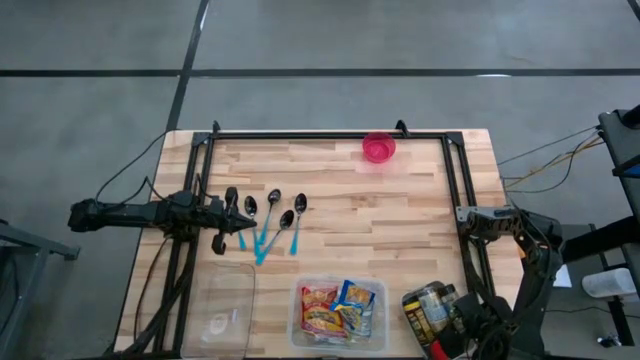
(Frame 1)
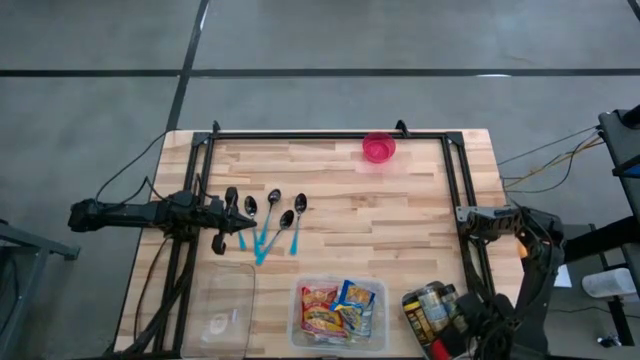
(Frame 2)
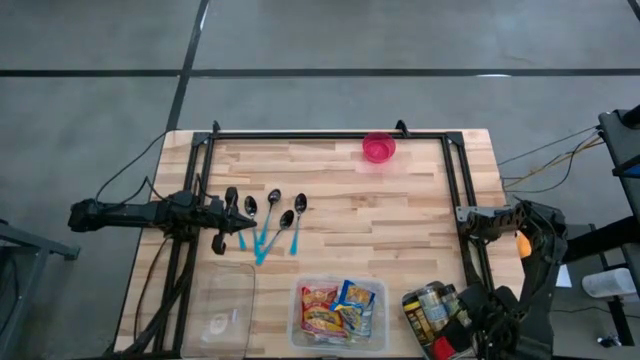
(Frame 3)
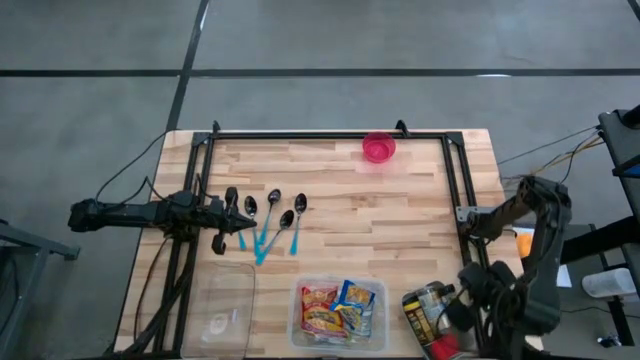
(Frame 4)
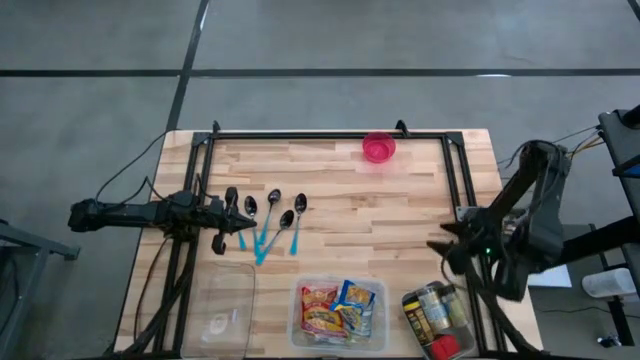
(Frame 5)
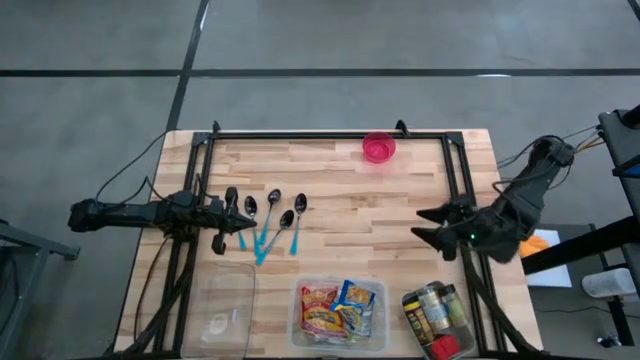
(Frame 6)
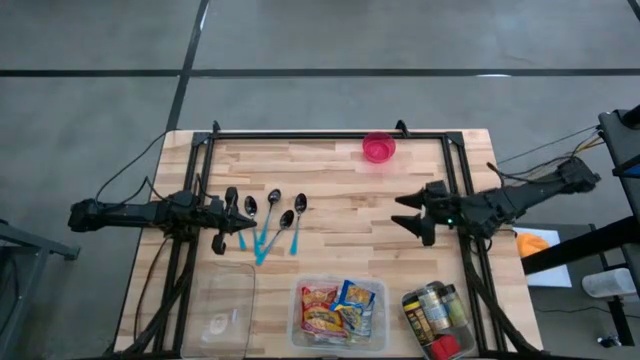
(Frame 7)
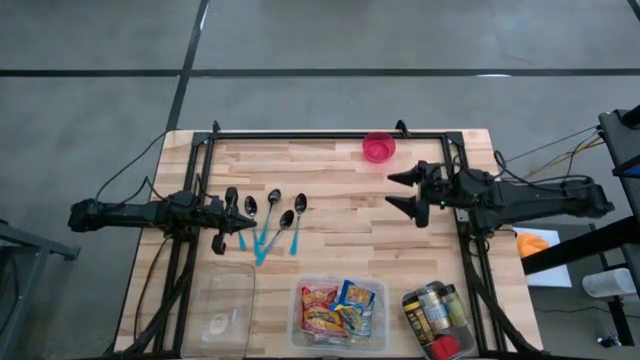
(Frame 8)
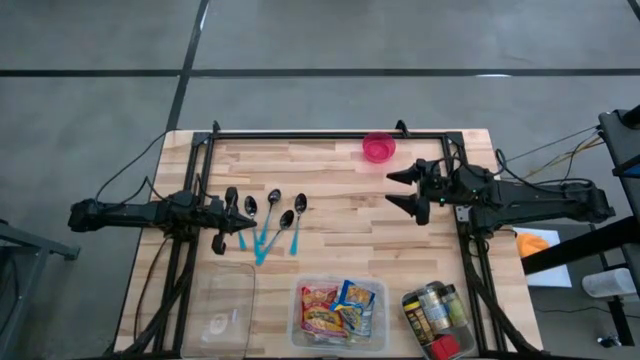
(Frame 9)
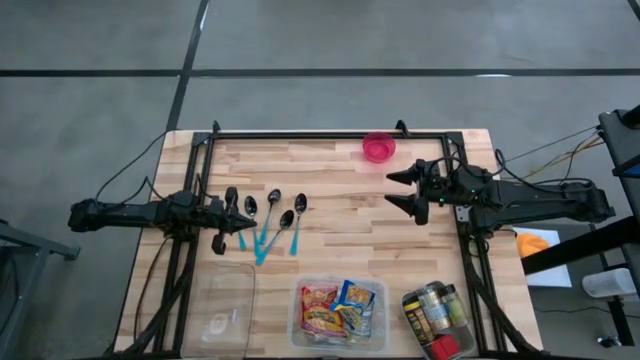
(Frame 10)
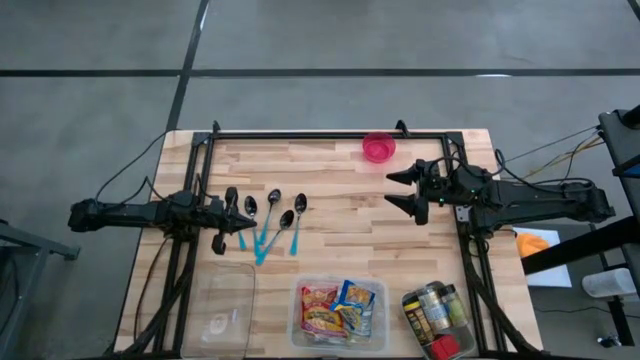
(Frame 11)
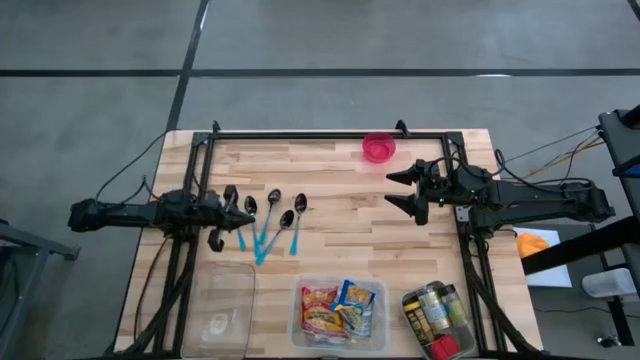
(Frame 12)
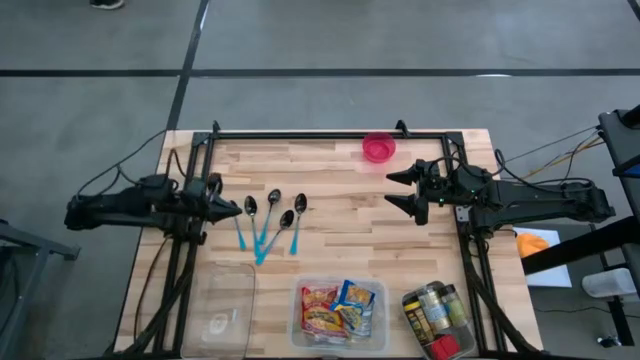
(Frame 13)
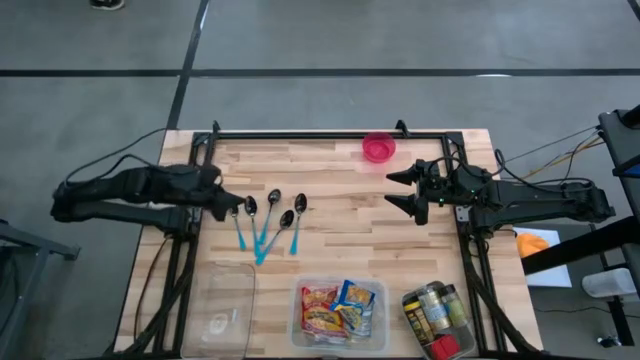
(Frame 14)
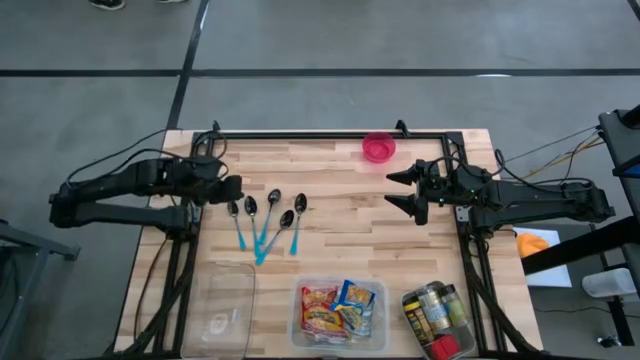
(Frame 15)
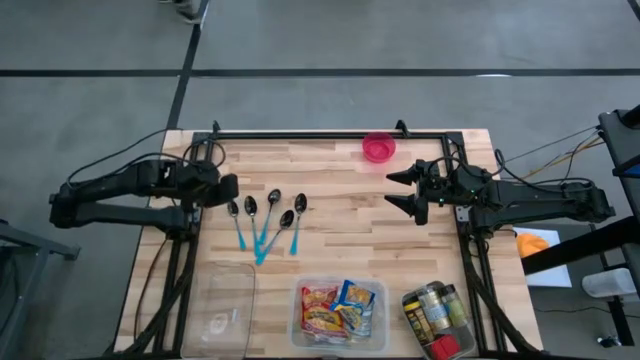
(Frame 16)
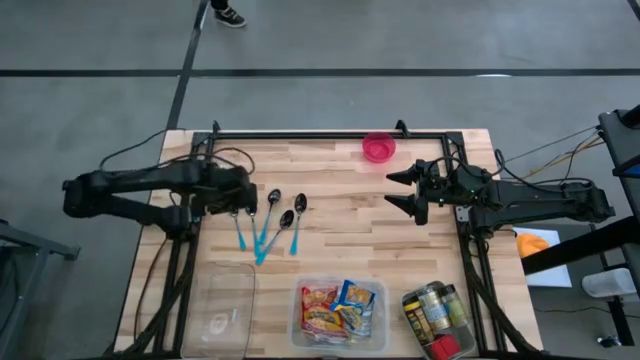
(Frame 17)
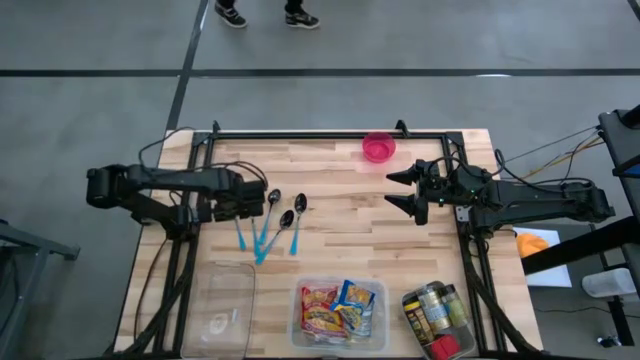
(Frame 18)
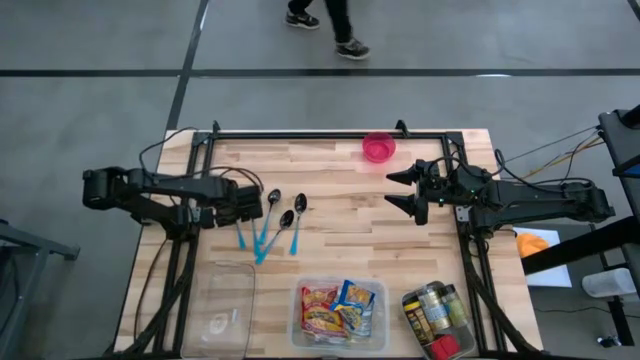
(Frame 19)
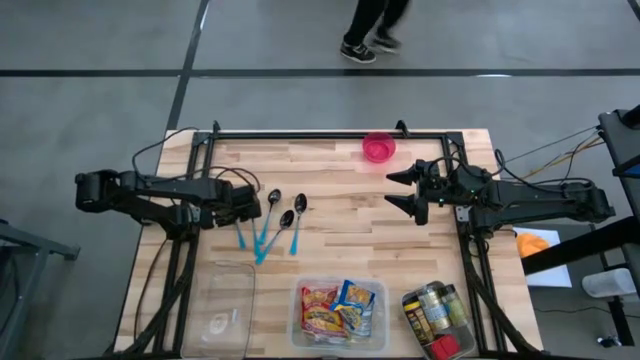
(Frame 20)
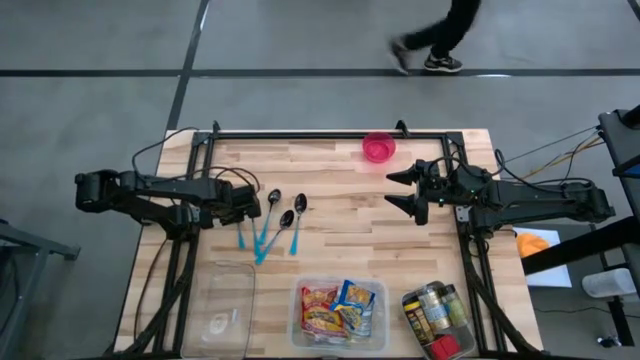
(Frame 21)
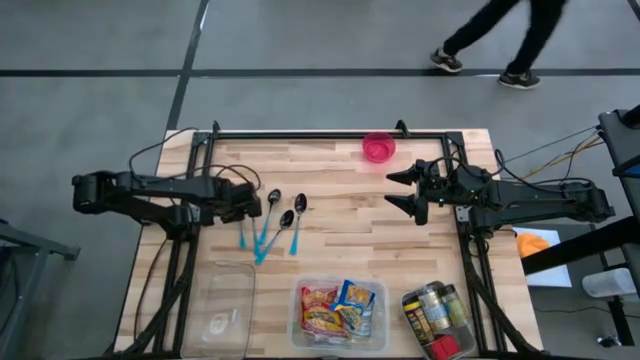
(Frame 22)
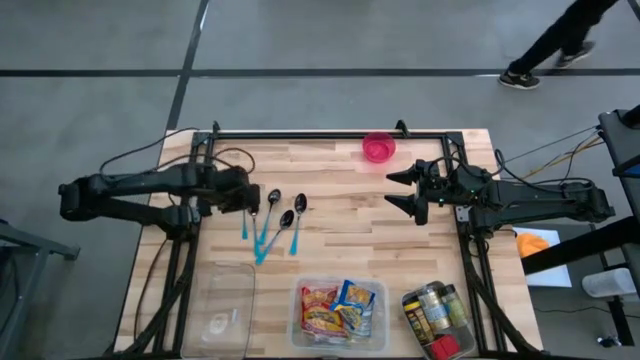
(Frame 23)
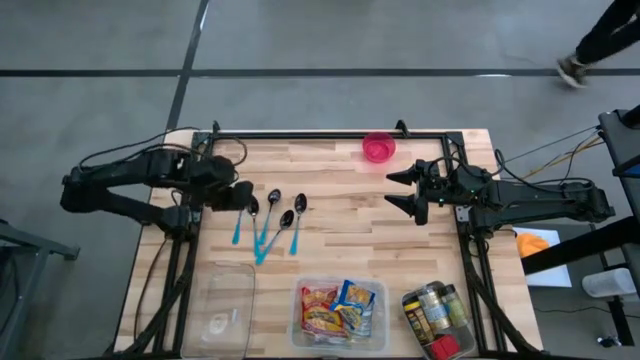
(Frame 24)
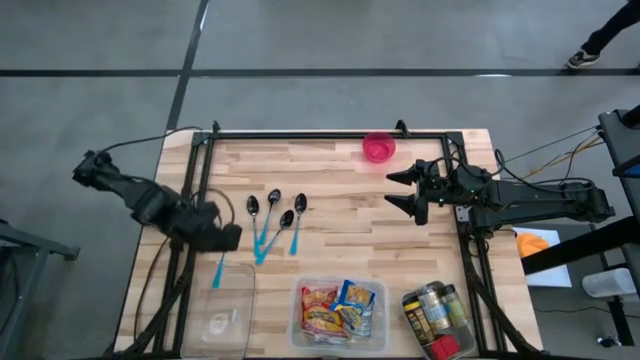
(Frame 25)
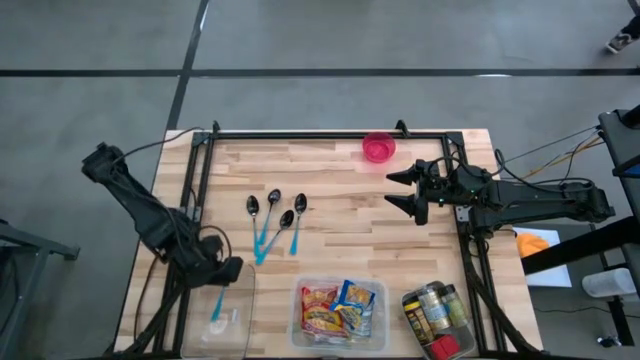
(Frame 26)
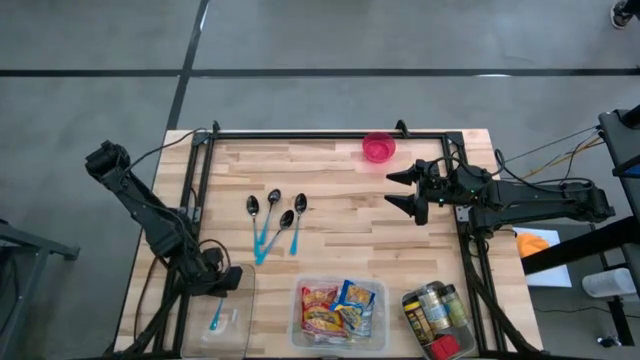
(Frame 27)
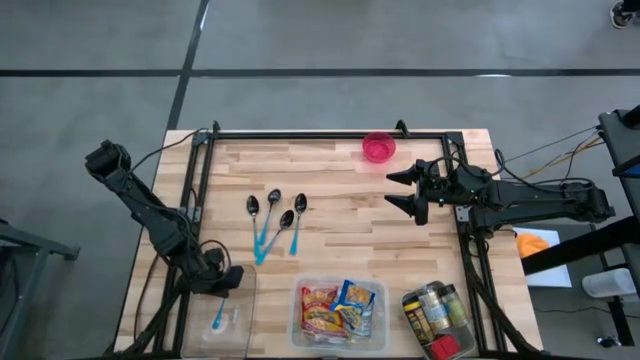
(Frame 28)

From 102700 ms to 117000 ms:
Put the blue spoon into the transparent bin

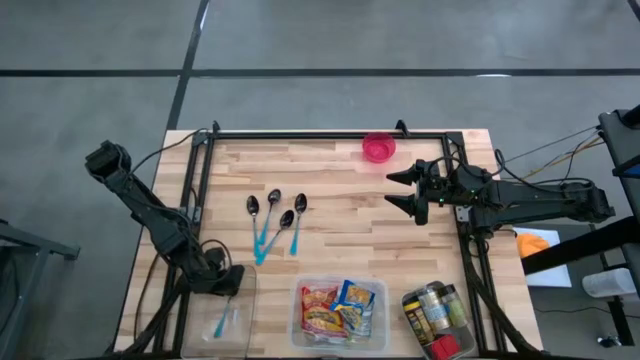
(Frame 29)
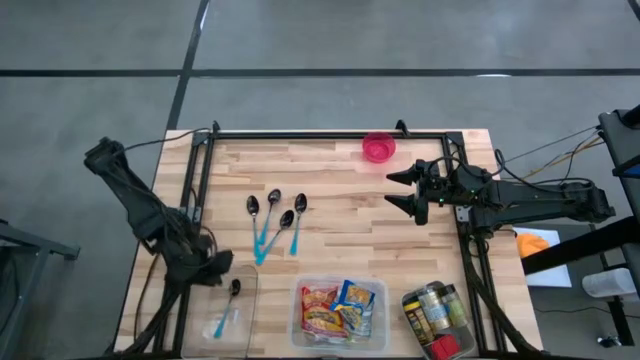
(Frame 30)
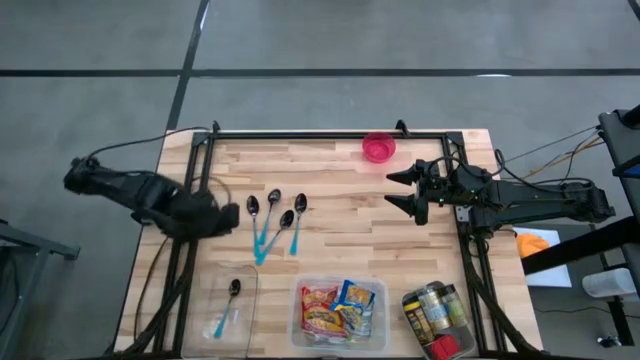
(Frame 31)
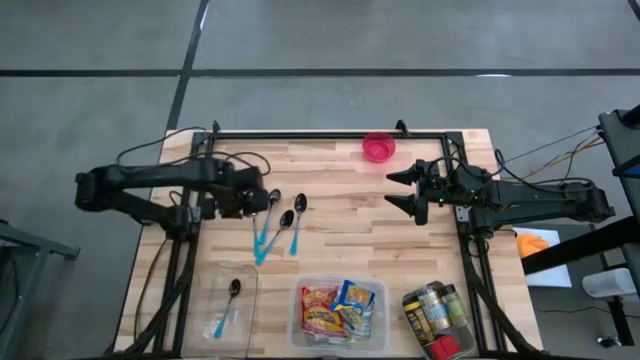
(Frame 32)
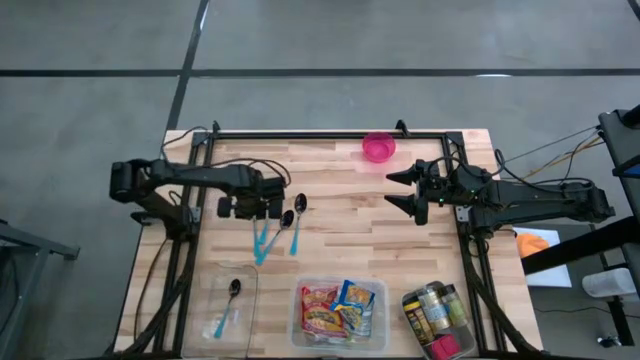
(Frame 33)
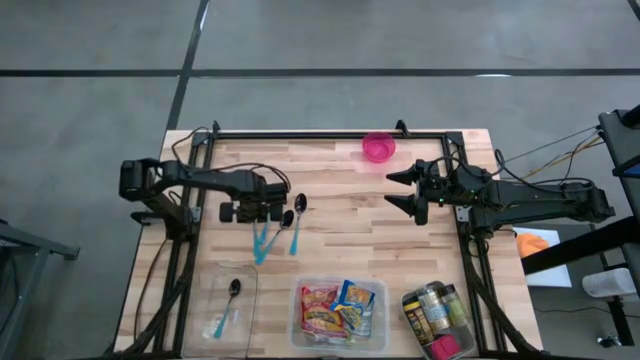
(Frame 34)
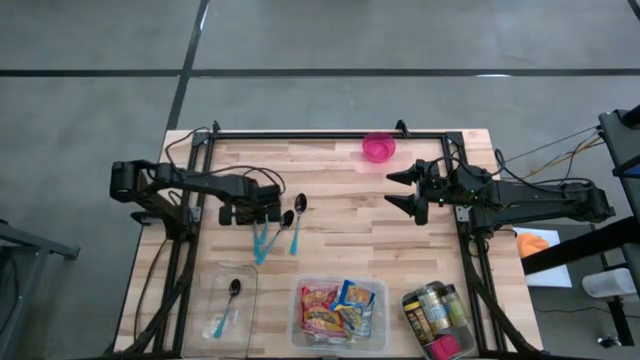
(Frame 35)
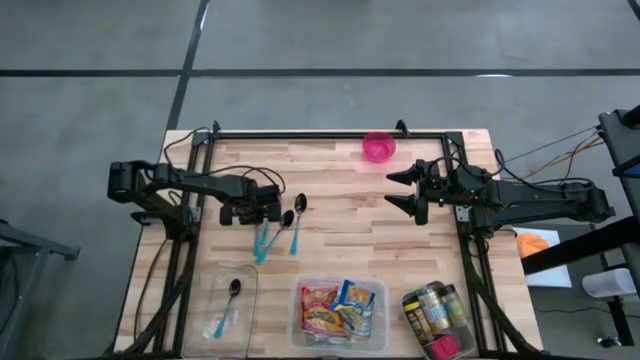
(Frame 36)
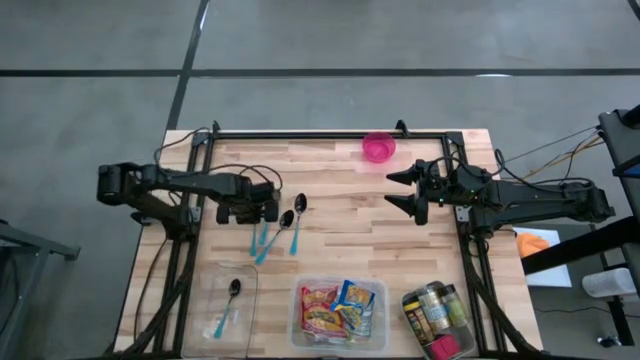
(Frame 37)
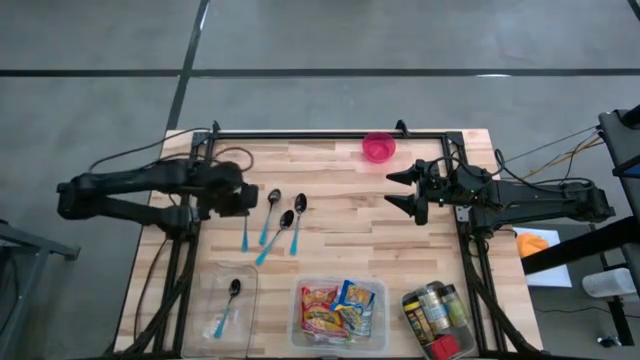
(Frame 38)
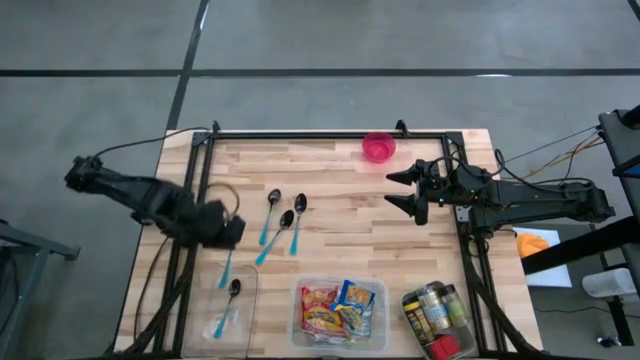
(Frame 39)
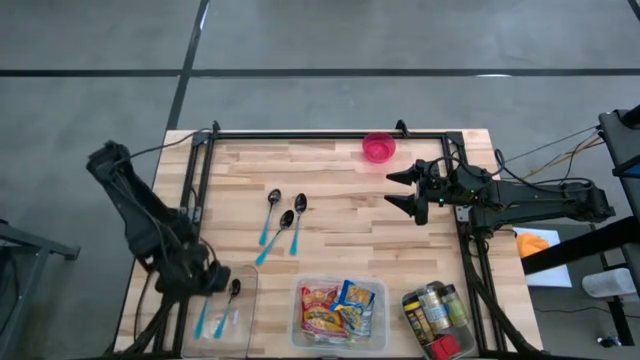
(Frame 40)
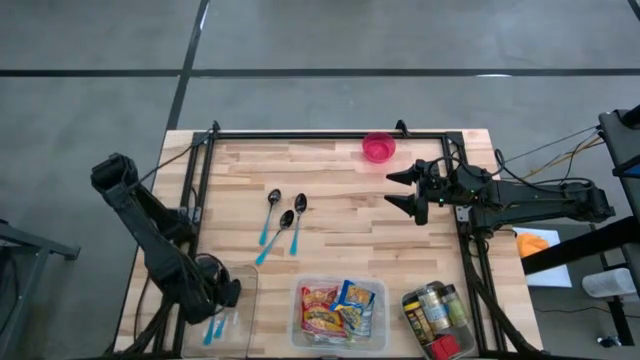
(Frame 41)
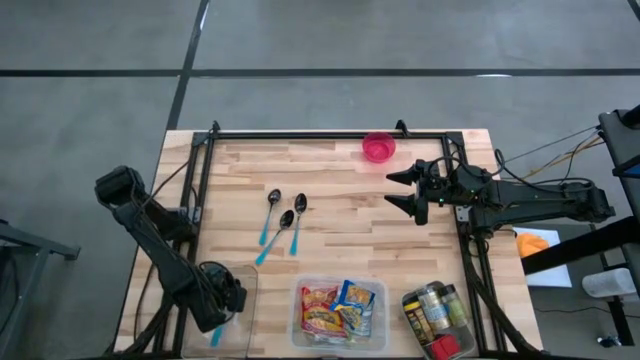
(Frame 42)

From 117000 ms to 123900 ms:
Put the blue spoon into the transparent bin
